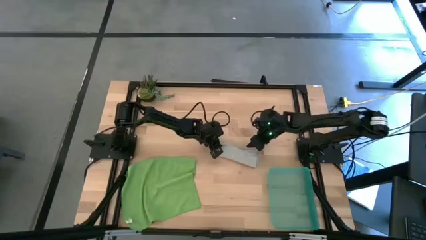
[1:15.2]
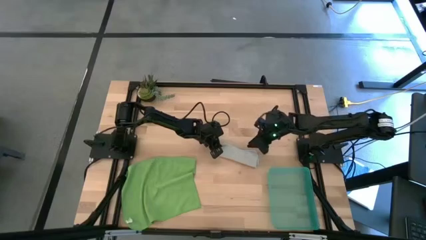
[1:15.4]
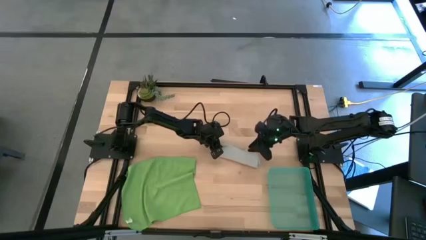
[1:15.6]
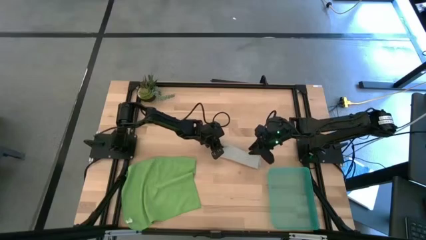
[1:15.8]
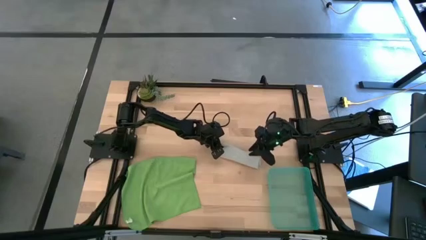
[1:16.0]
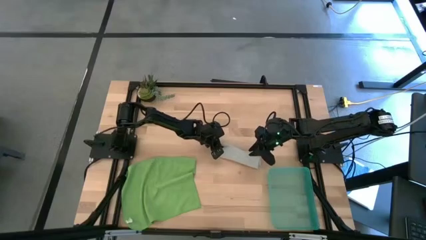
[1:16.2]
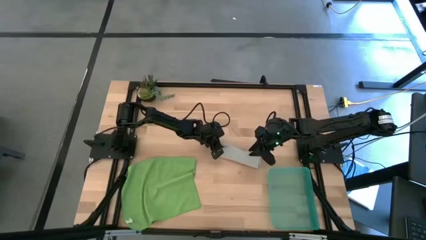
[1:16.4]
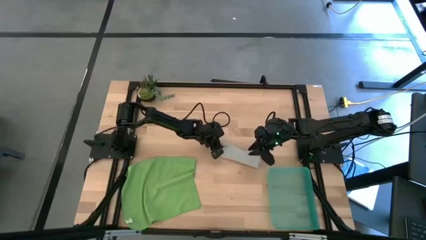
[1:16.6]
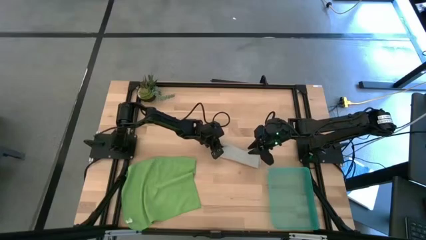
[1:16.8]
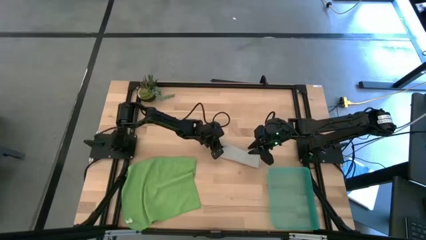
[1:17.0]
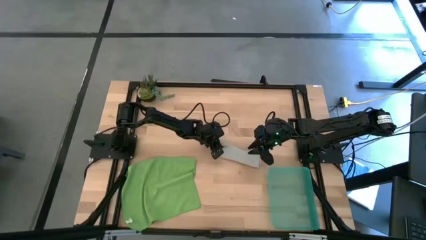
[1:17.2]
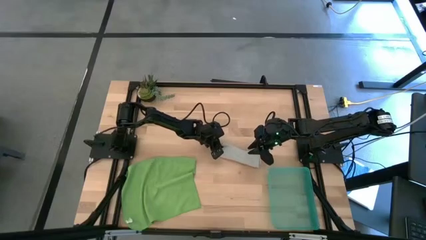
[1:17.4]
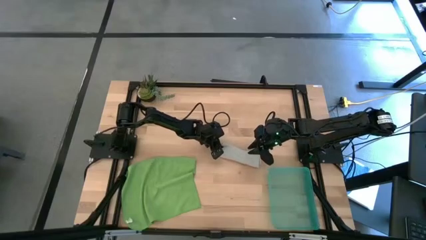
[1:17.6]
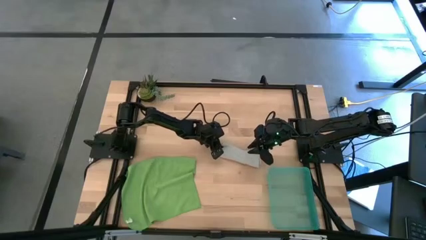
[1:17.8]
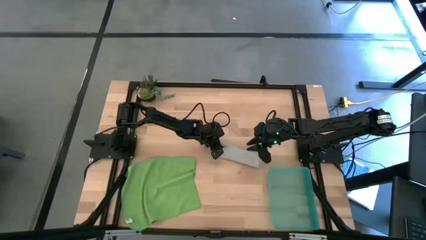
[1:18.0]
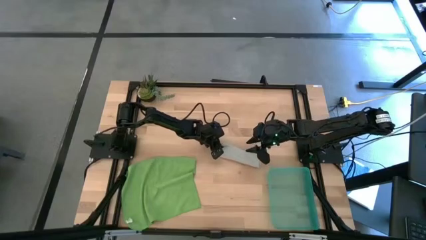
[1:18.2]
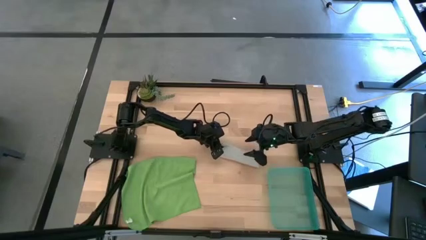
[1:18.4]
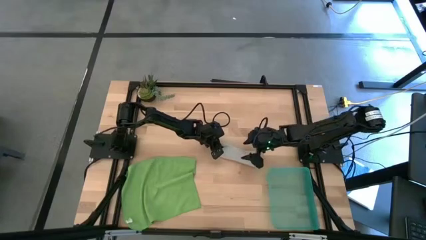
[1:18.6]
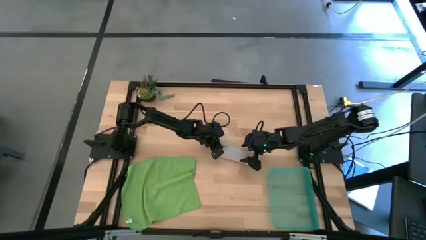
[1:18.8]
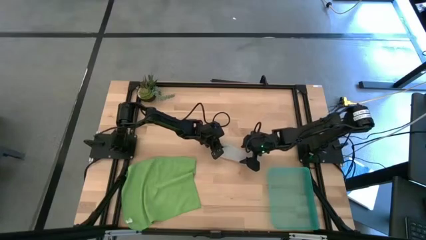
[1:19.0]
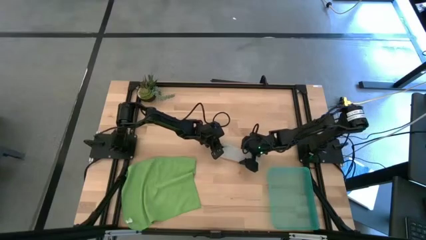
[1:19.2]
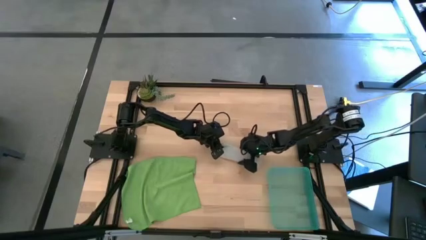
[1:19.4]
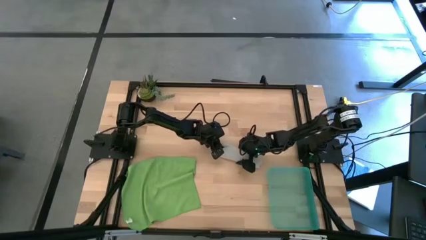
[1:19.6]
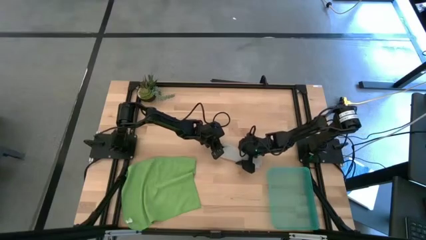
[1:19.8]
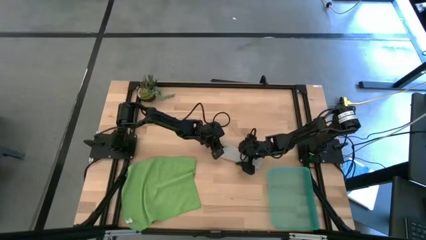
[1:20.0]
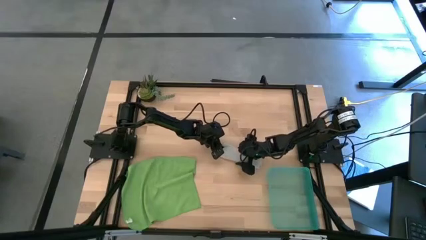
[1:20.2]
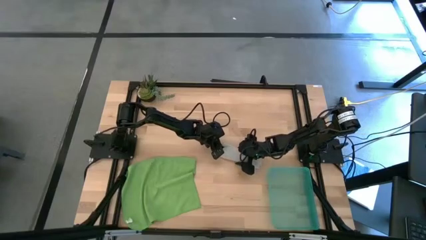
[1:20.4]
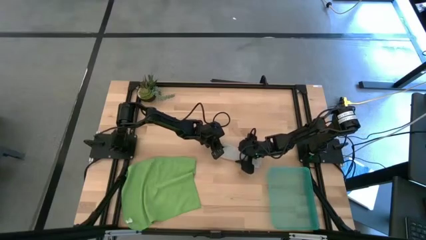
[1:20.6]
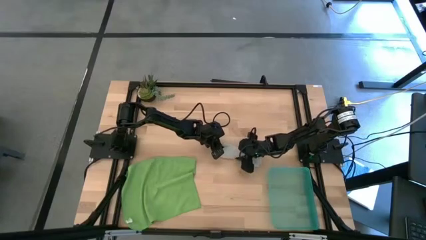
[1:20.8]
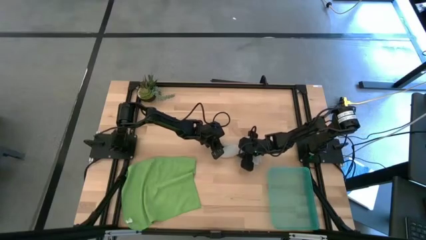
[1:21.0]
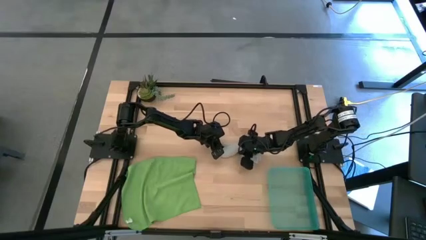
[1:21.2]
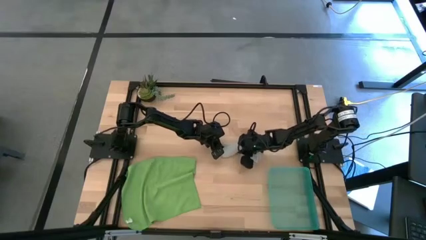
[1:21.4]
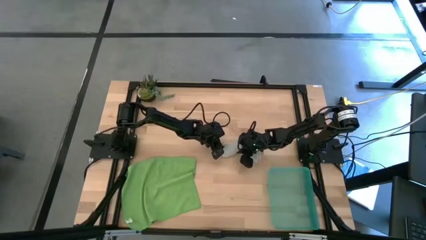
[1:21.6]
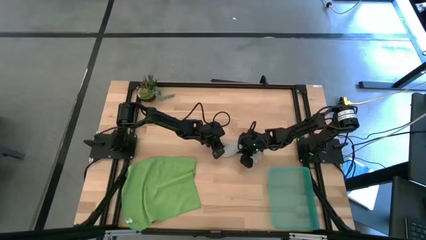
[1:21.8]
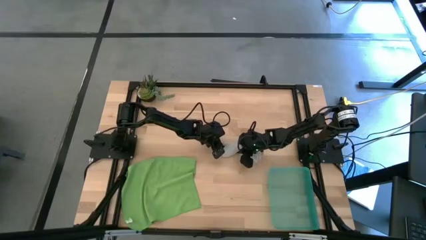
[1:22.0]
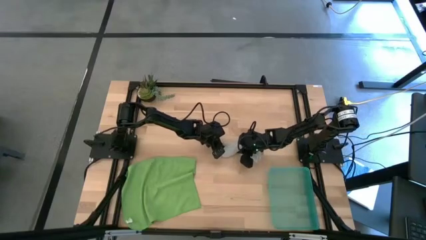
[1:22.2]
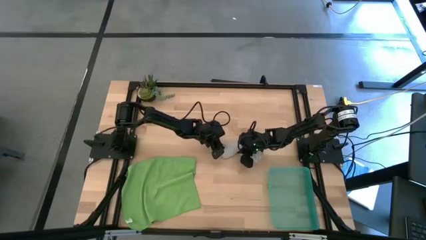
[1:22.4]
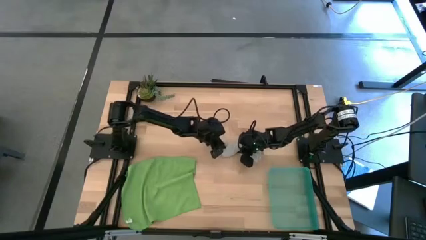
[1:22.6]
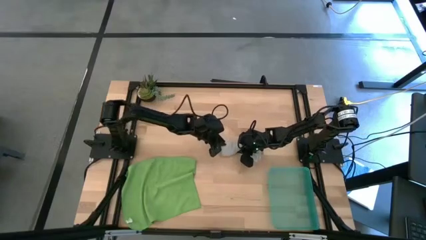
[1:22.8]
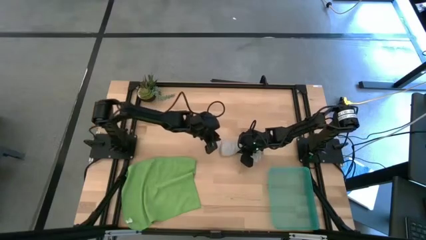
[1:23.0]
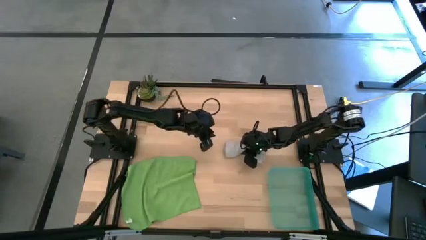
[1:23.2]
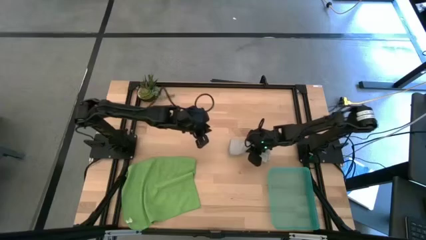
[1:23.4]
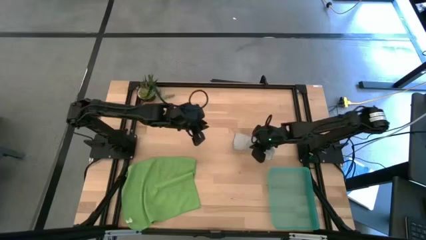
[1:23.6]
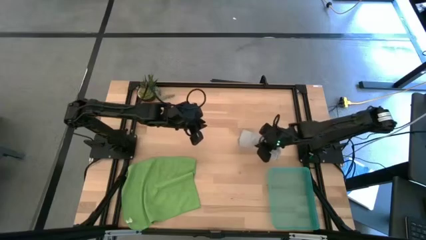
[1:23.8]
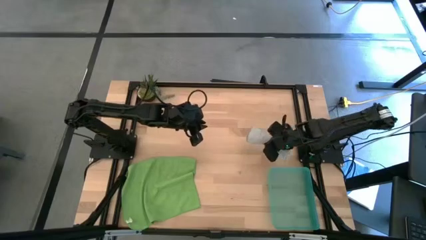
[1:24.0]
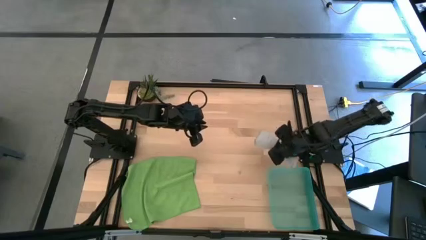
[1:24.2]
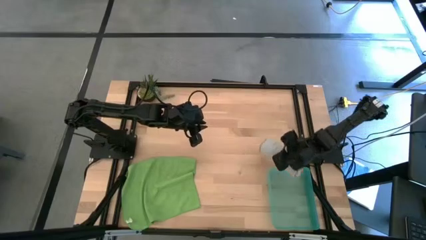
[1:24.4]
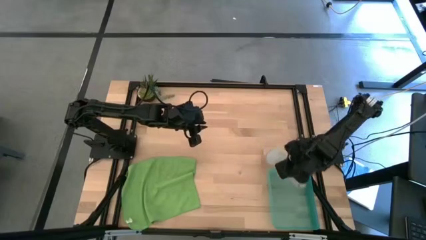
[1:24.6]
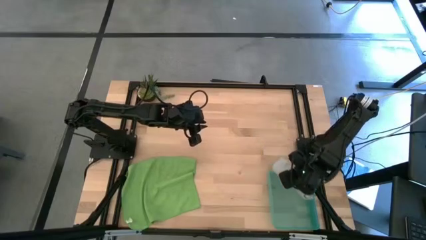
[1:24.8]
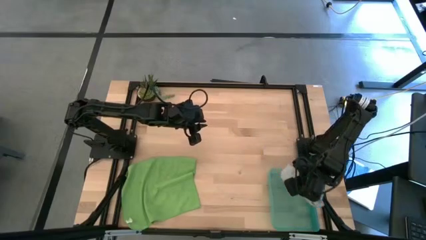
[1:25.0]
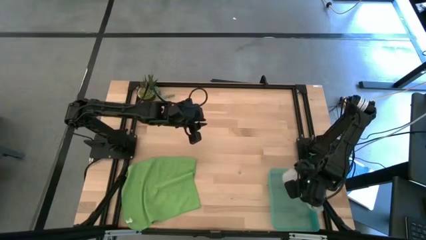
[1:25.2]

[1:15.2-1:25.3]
Task: Roll microfiber towels into tight, uniform cylinder then place into a basket
Put the gray microfiber towel into the green bin

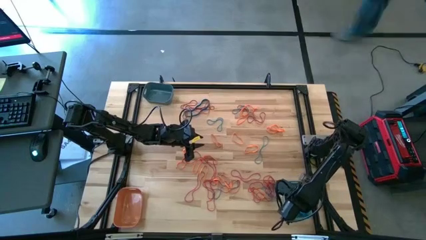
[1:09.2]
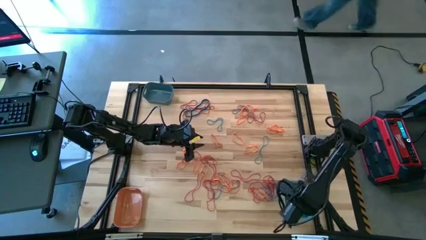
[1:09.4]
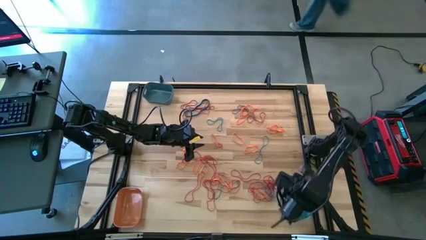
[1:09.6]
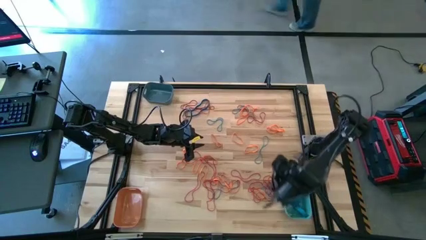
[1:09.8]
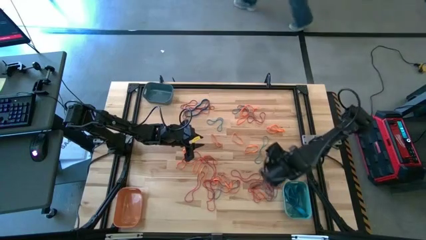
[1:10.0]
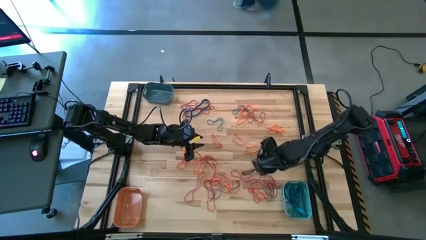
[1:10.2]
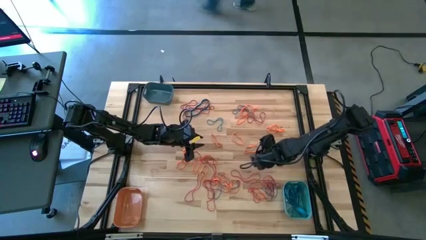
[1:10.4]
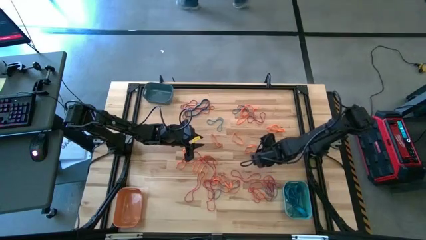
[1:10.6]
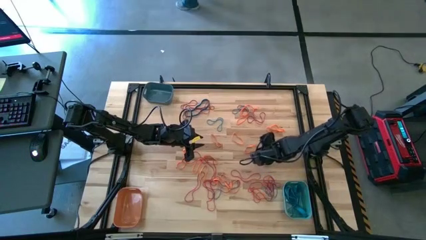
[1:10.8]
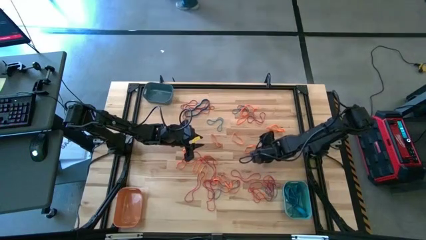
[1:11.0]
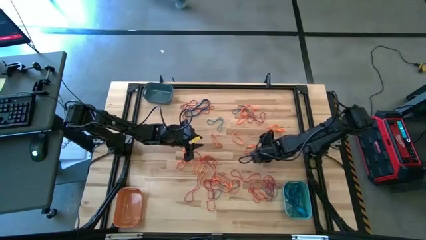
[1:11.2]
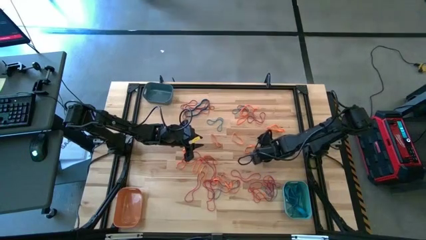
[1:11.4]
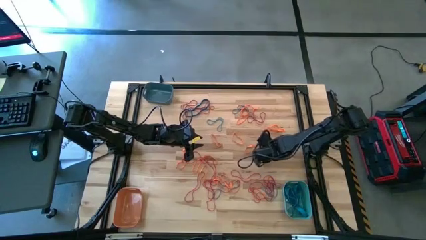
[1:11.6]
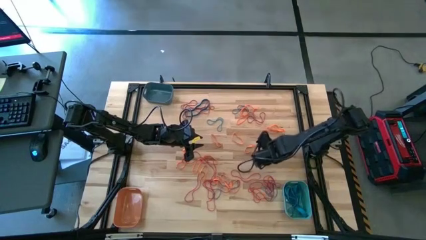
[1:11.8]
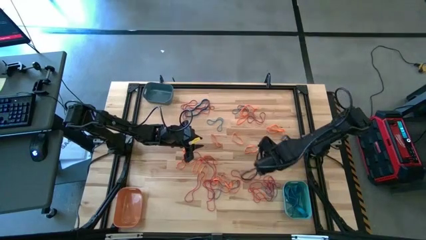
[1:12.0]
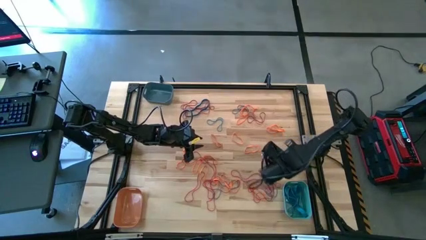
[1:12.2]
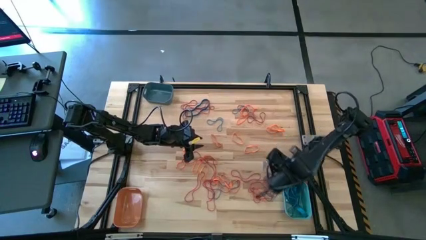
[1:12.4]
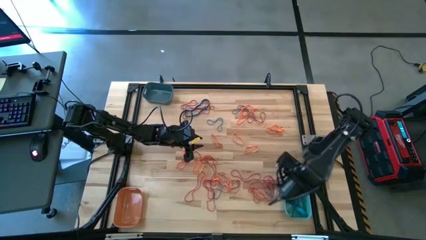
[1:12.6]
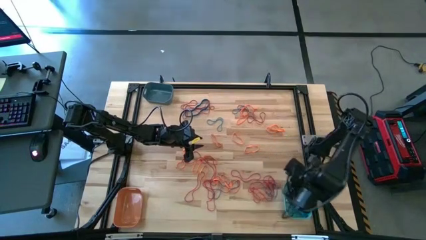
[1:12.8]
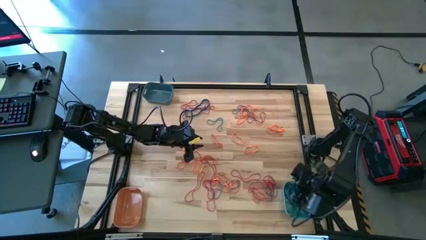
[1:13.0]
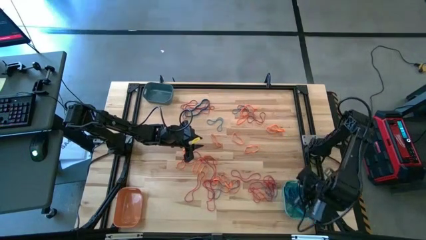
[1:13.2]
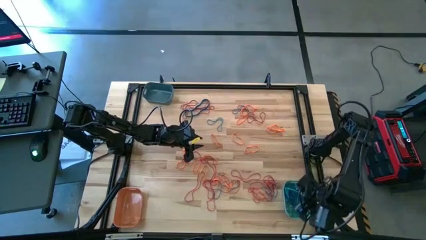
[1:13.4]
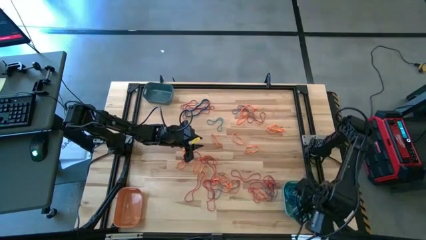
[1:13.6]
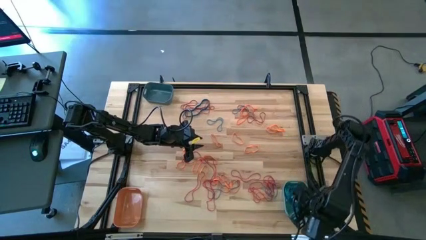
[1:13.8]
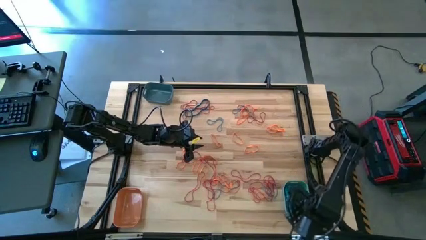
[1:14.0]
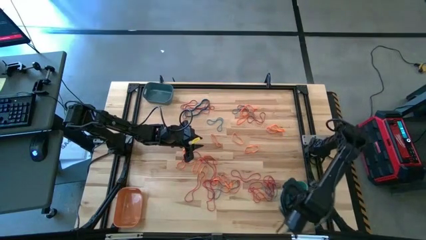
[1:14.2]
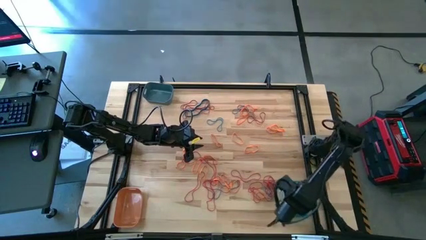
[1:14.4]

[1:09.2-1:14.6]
Task: Sort rubber bands into baskets
Put the blue rubber band into the light blue bin

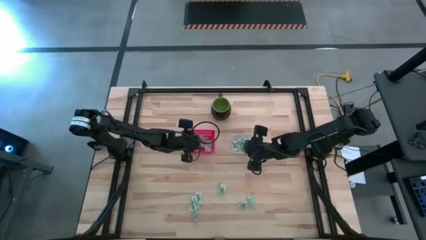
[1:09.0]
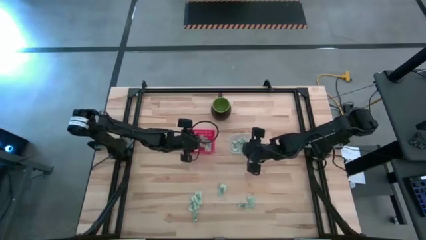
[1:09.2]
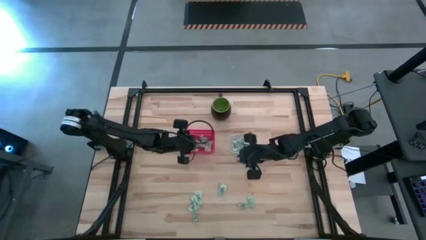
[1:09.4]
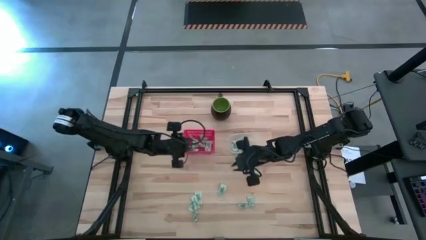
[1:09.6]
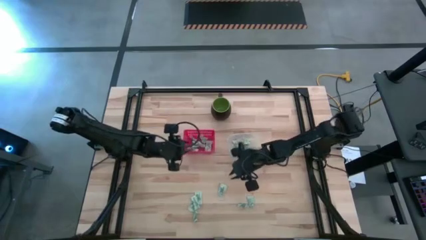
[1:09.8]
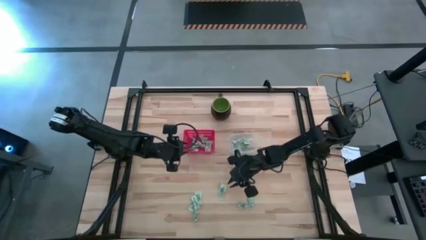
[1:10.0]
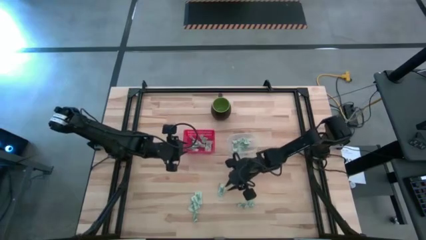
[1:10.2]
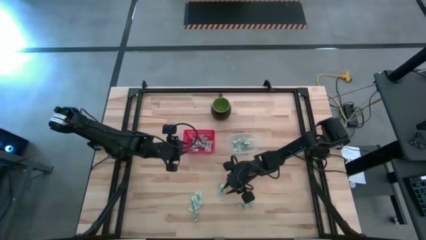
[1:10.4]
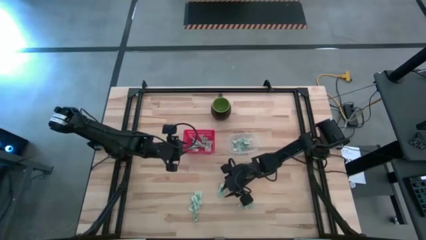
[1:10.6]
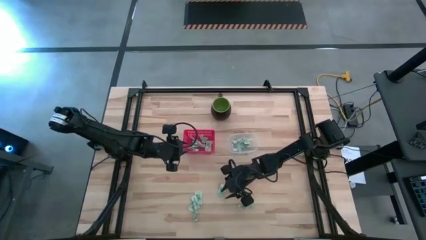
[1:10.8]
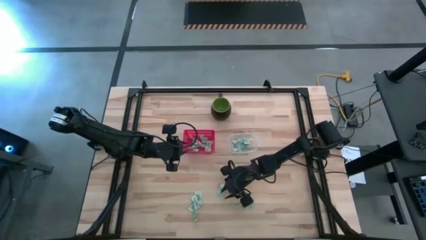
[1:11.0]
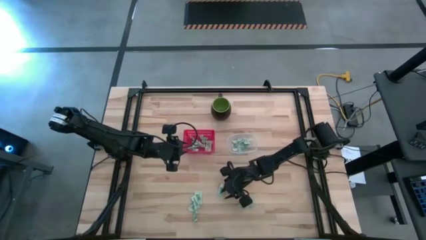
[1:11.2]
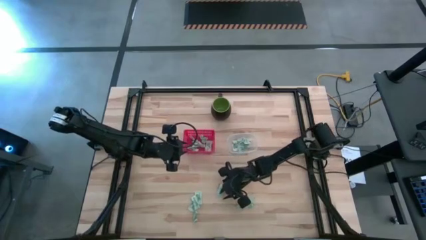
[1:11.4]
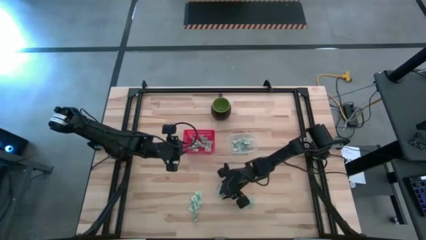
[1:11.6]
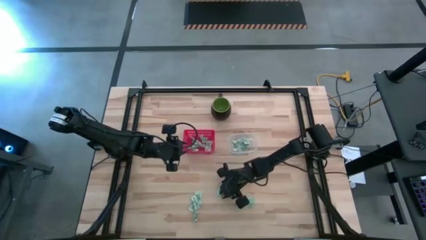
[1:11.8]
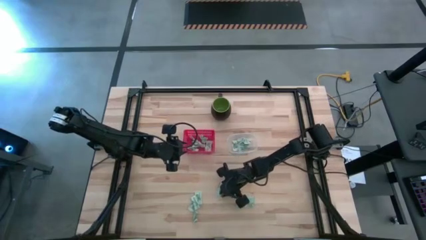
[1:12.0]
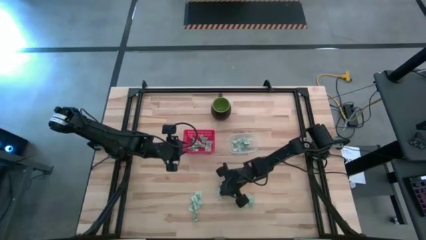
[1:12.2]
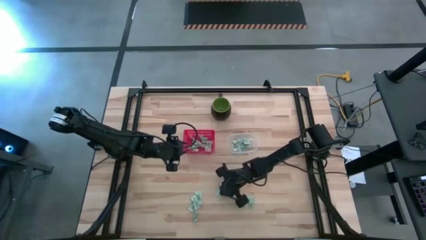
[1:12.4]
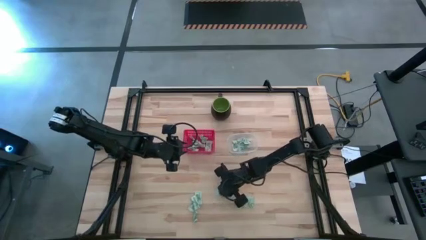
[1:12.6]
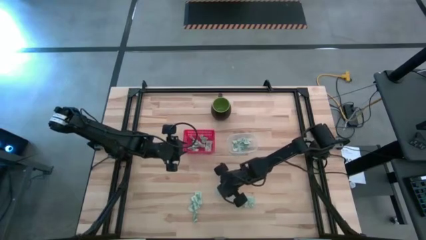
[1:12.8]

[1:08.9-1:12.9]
Task: Pick and place items into bin
Put the stevia packet into the transparent bin
